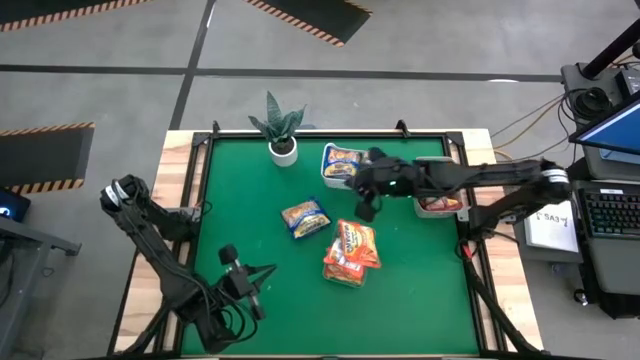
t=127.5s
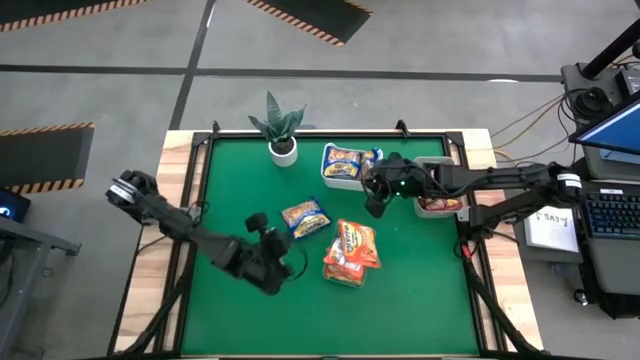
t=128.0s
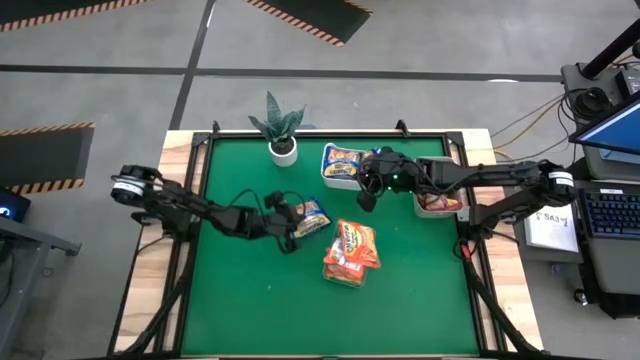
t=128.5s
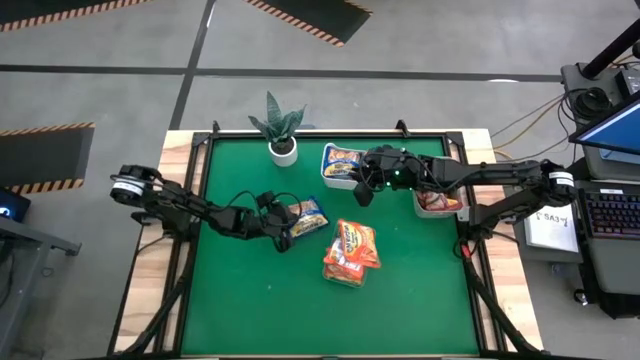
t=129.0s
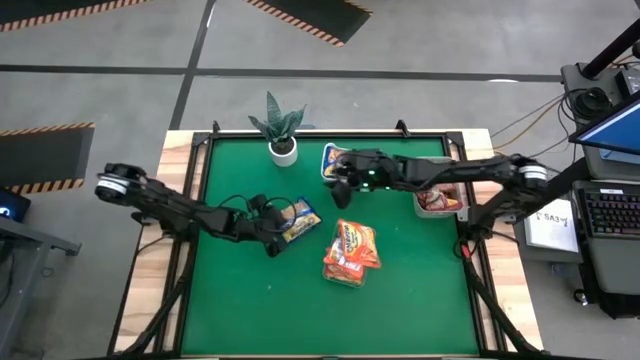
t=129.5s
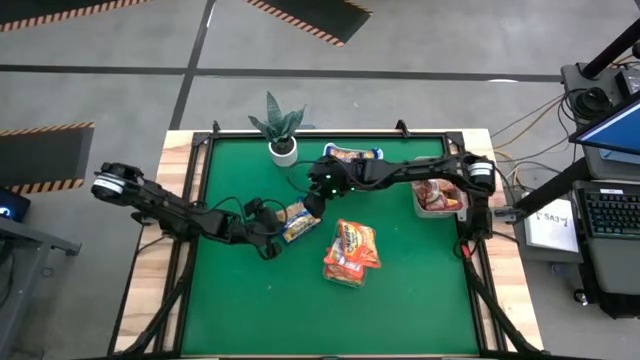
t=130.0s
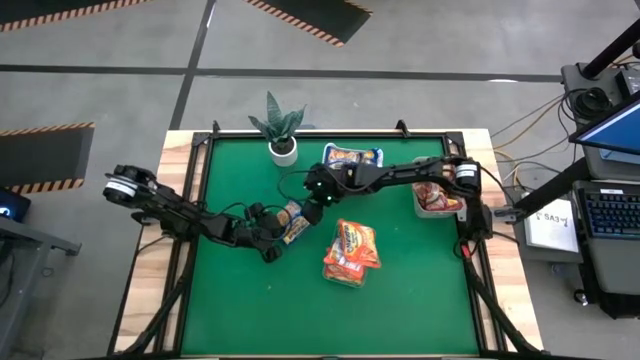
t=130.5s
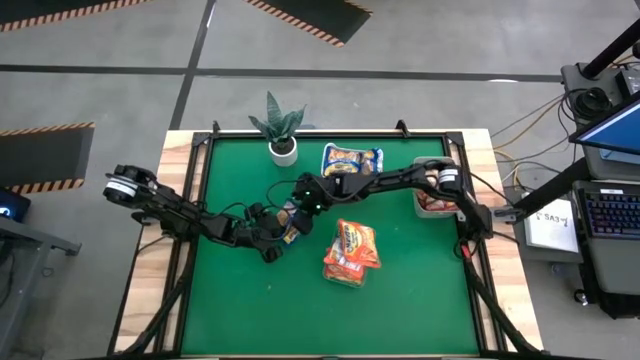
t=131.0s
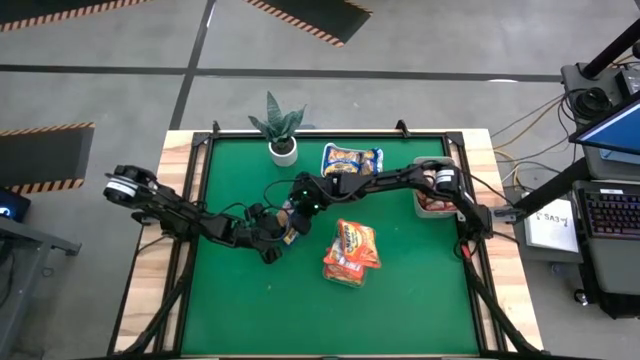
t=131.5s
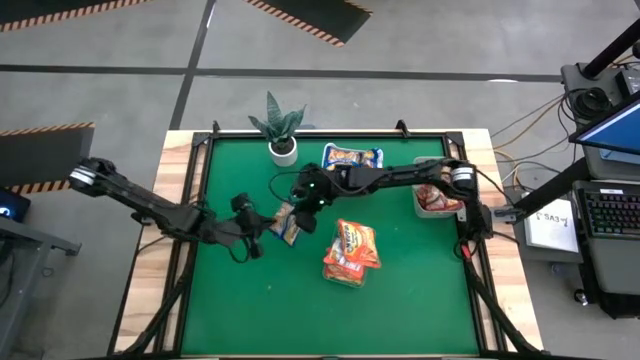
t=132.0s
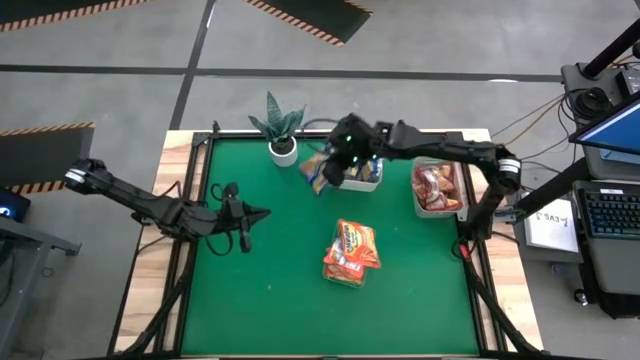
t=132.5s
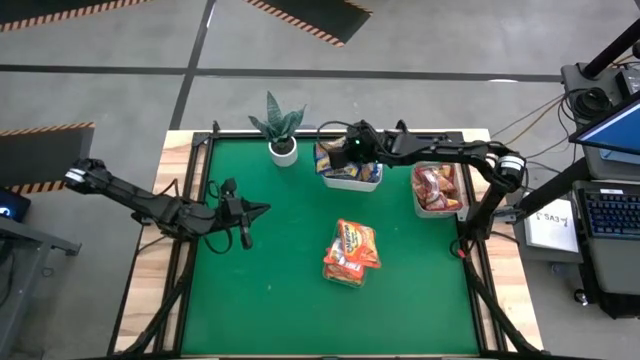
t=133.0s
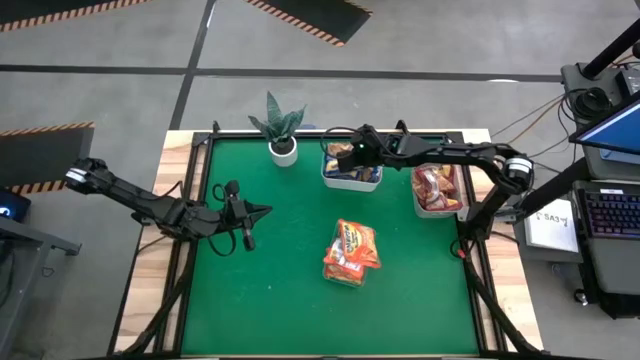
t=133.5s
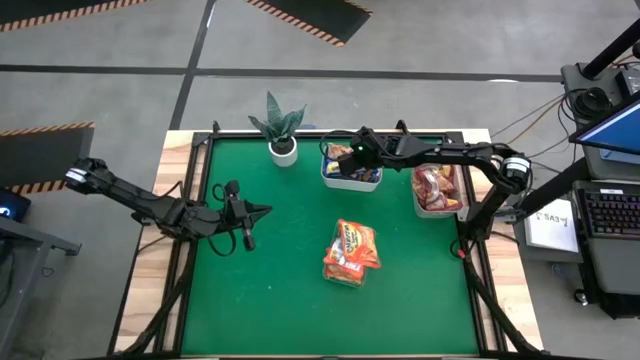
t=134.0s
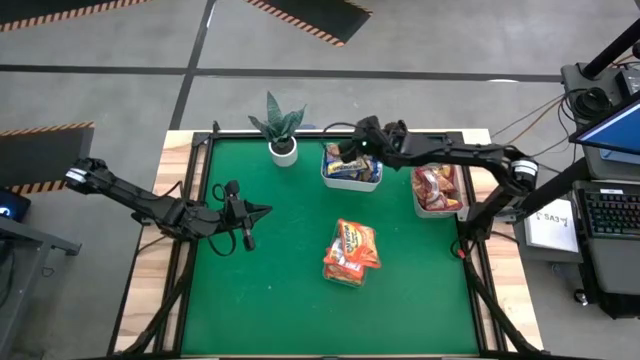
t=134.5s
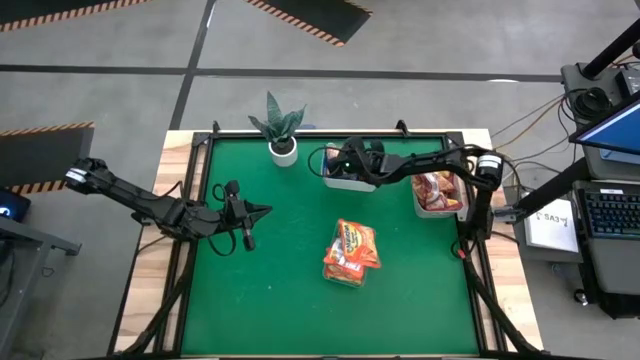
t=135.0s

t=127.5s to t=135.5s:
Task: Sort Maruchan noodles
Put the blue noodle pack into the white bin

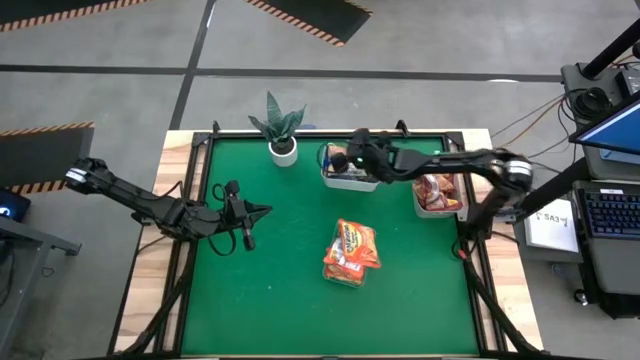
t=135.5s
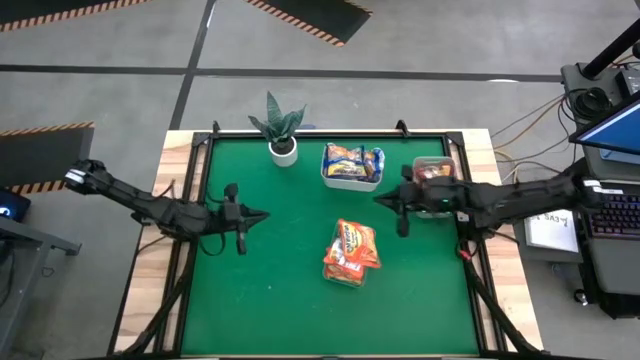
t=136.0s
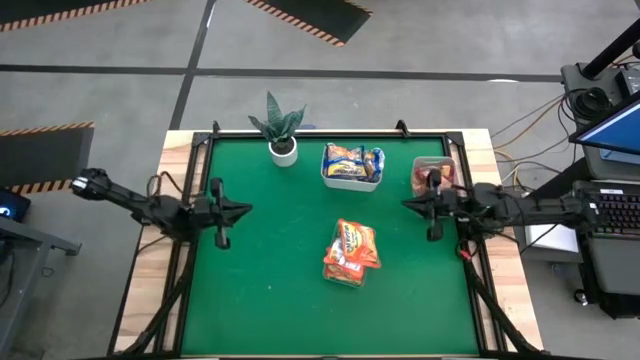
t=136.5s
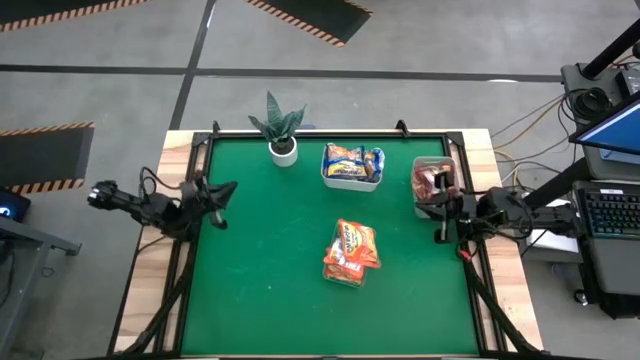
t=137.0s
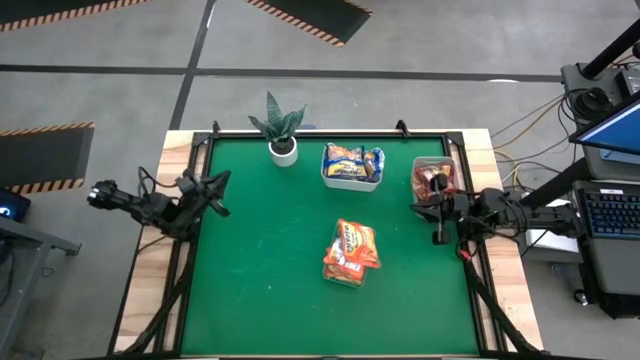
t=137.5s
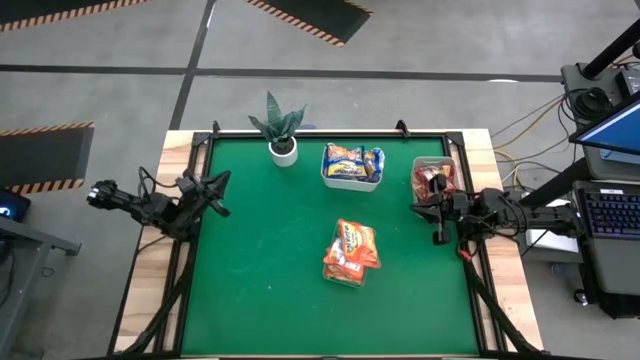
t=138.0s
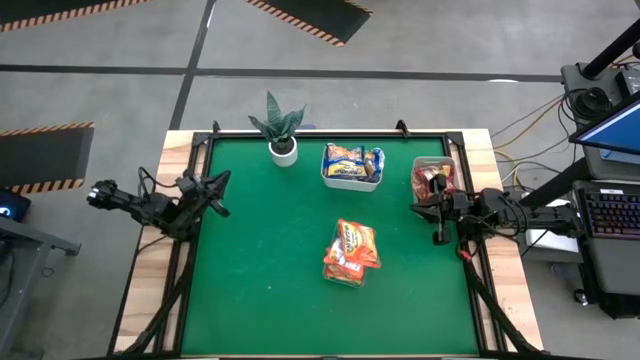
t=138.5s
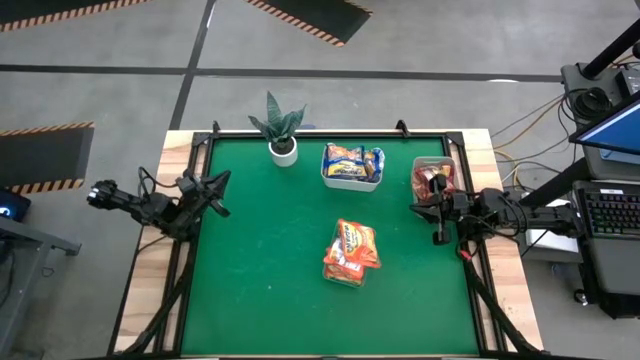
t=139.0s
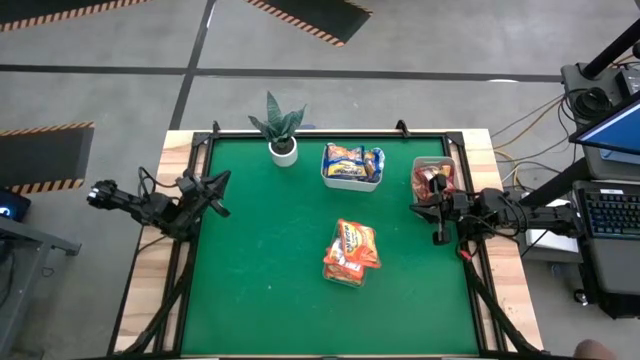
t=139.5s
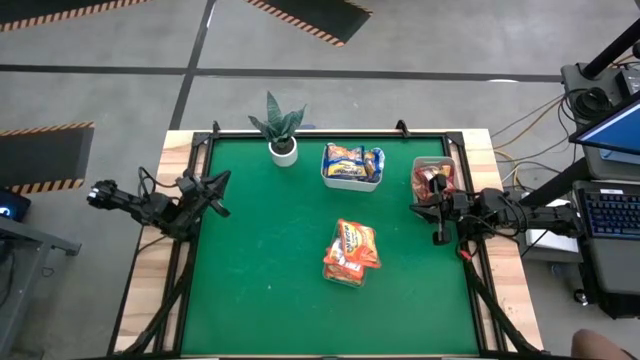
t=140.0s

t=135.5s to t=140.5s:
Return to Home Position

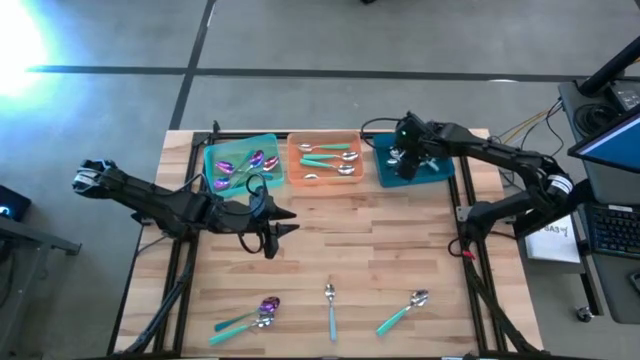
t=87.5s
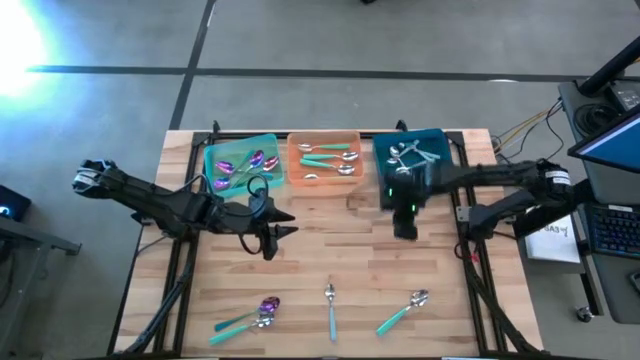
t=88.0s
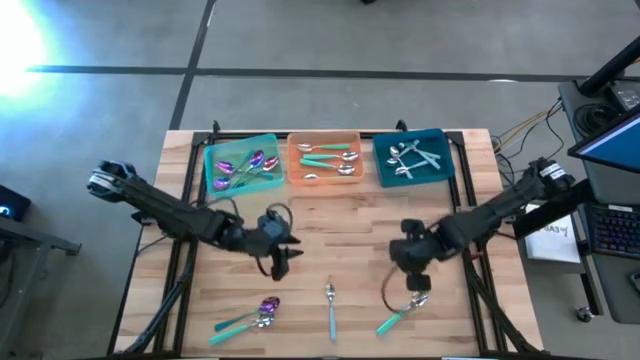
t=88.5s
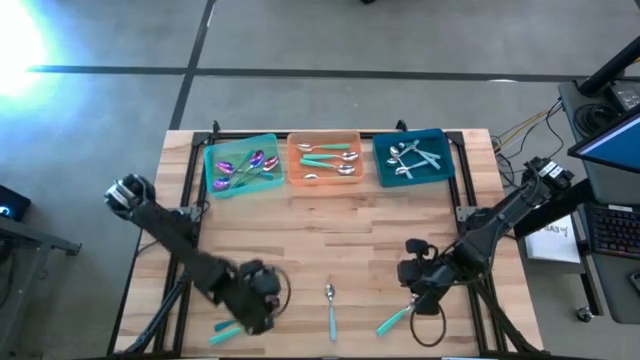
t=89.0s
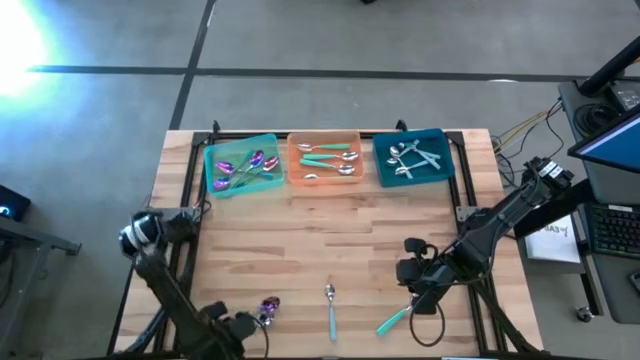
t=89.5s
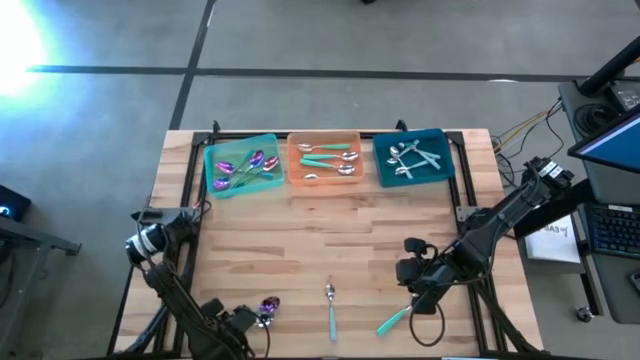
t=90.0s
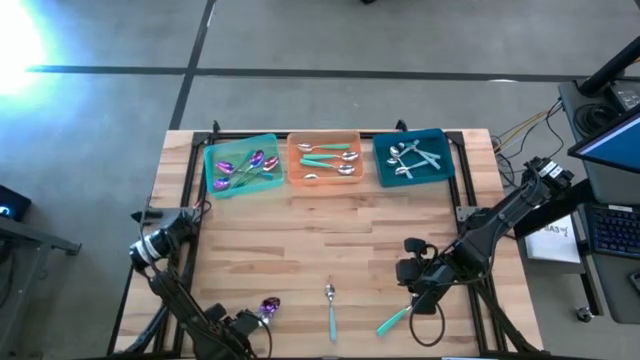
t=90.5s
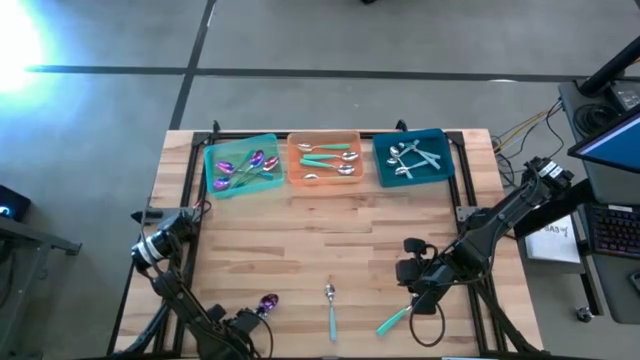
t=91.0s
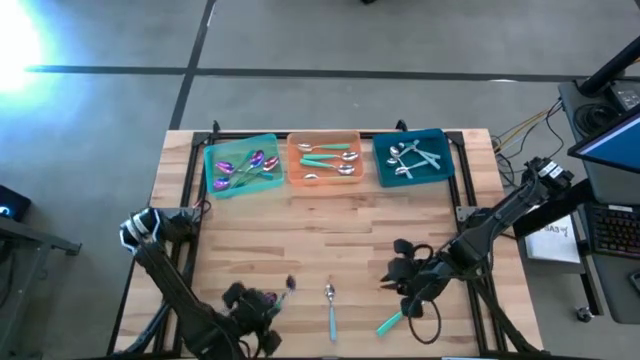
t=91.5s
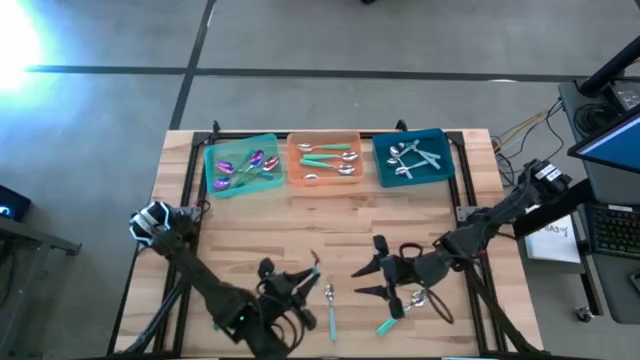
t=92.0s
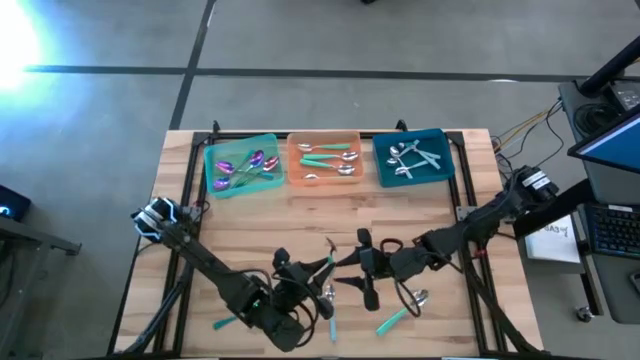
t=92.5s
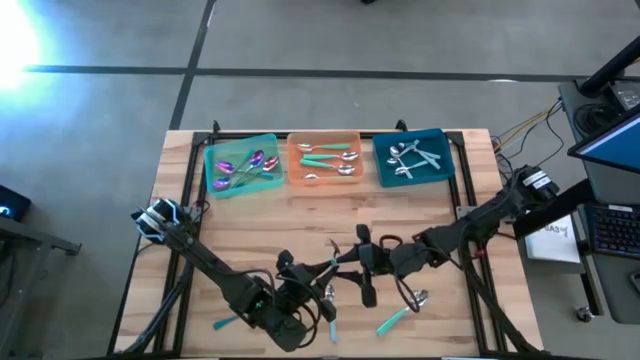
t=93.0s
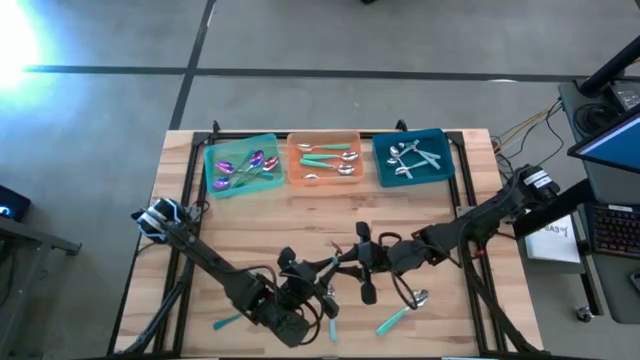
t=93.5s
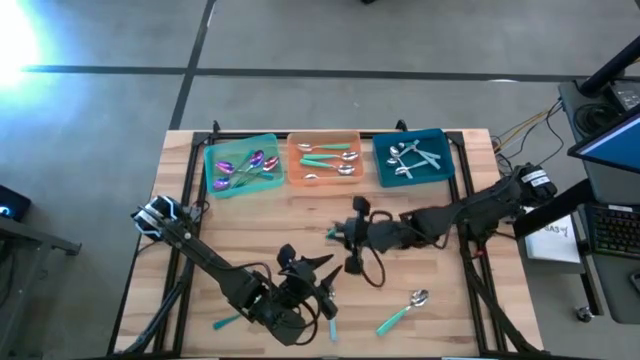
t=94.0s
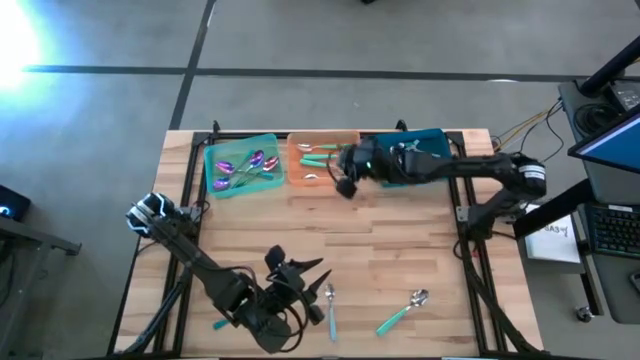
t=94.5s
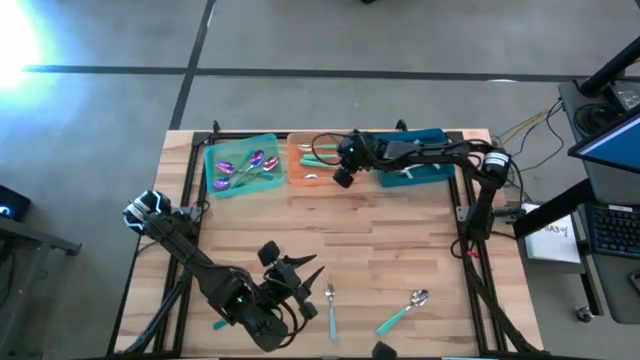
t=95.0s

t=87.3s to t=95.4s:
Task: Sort silverware by color (type)
Put the green spoon into the orange bin
